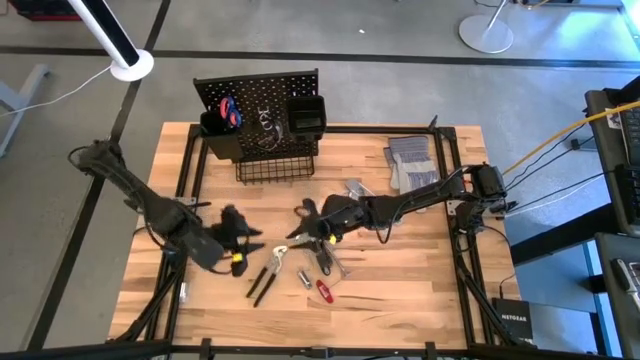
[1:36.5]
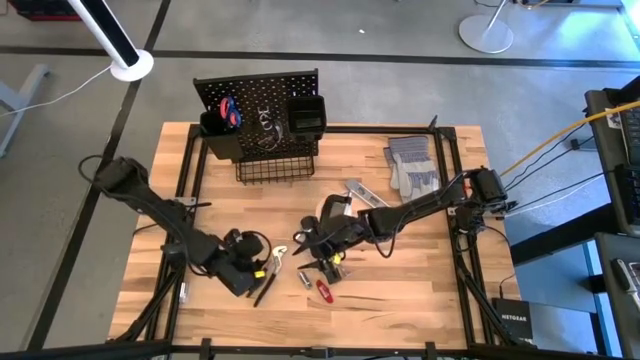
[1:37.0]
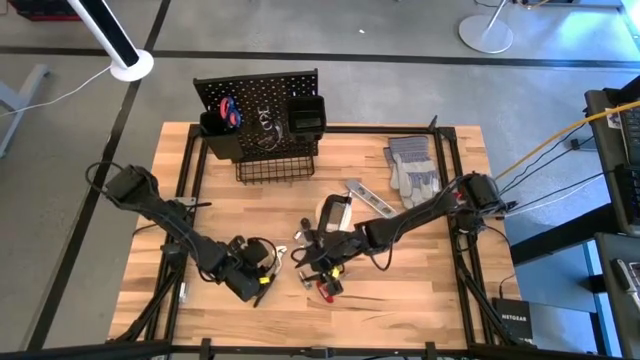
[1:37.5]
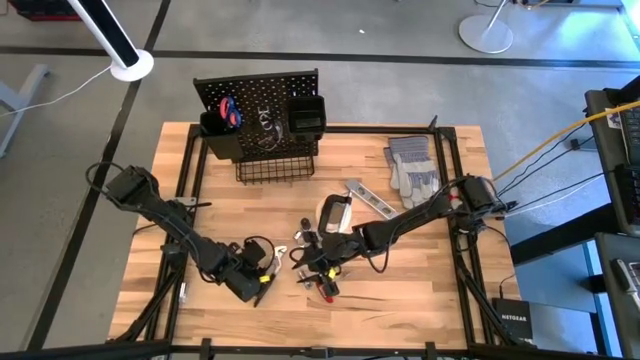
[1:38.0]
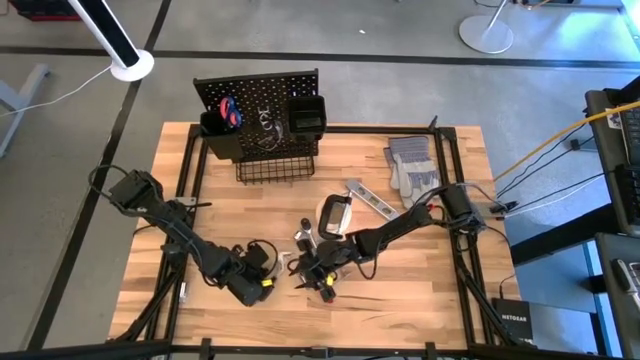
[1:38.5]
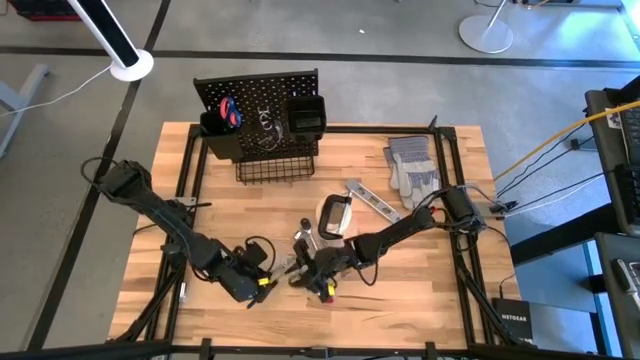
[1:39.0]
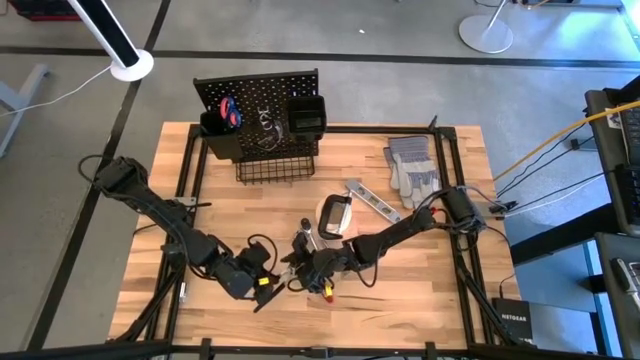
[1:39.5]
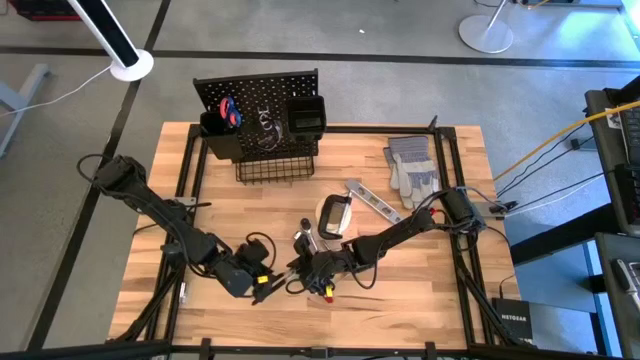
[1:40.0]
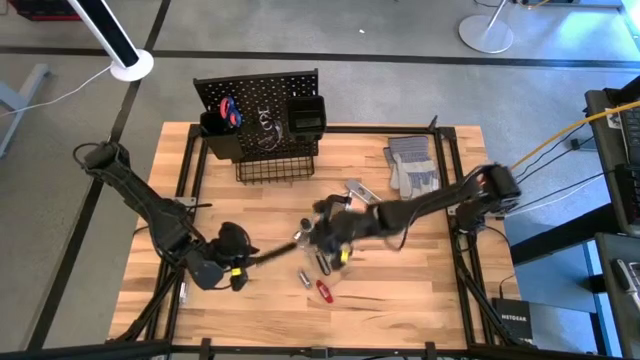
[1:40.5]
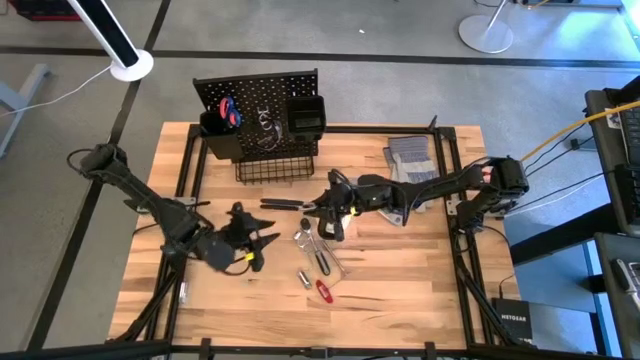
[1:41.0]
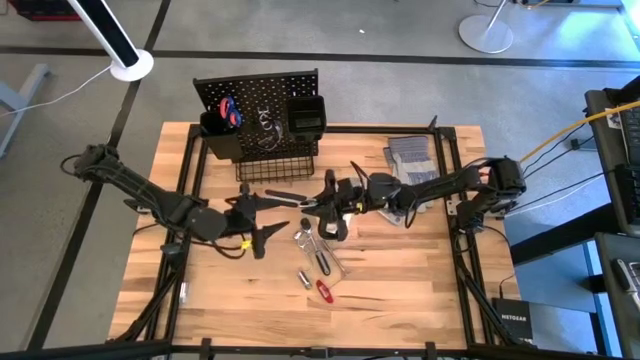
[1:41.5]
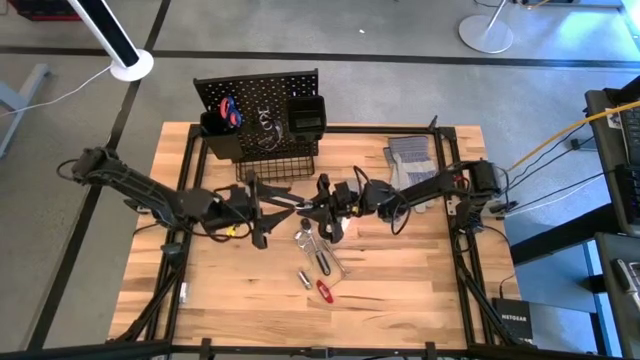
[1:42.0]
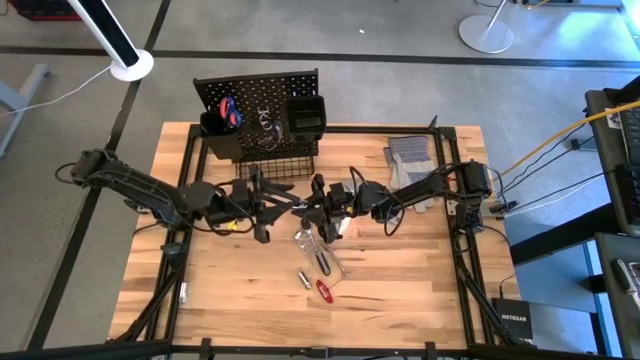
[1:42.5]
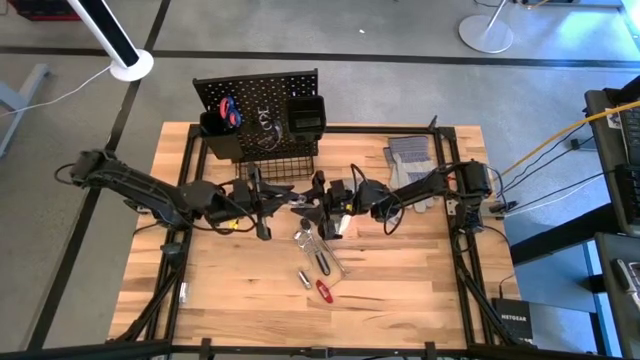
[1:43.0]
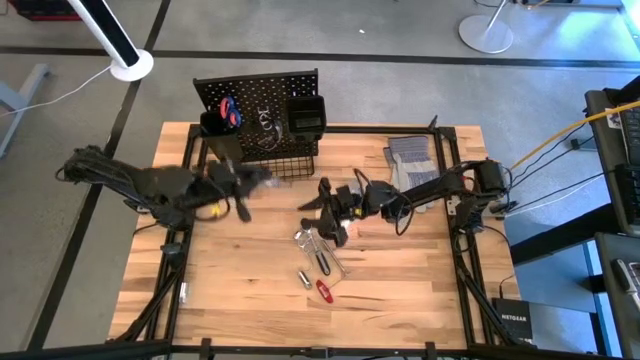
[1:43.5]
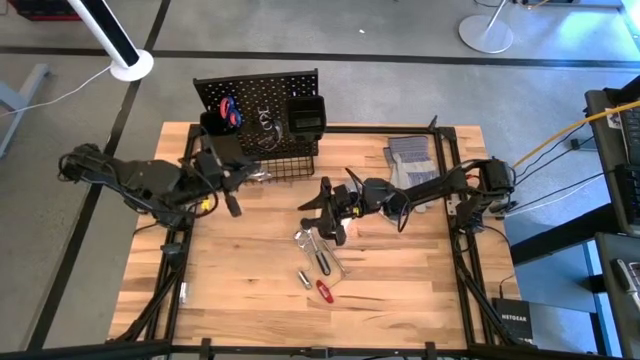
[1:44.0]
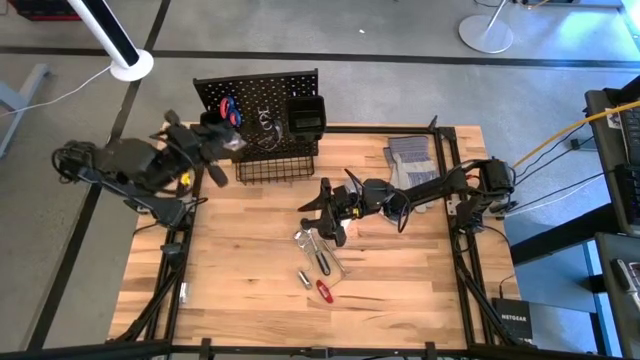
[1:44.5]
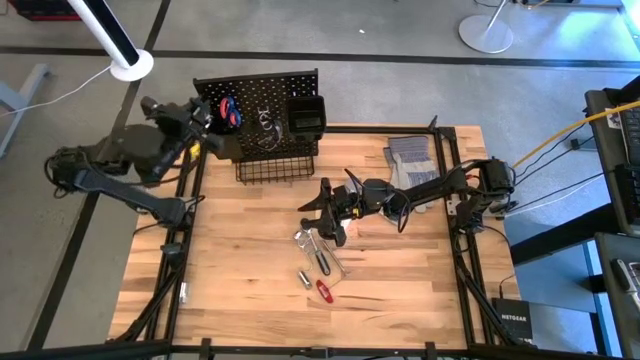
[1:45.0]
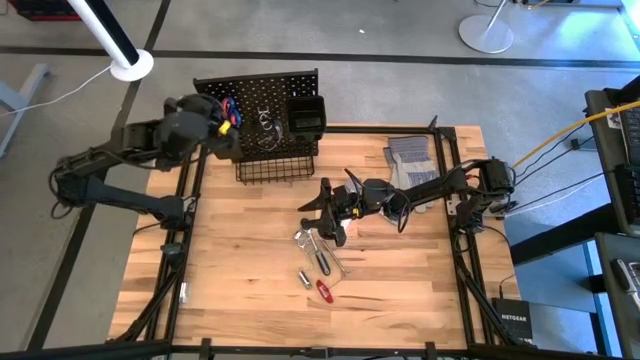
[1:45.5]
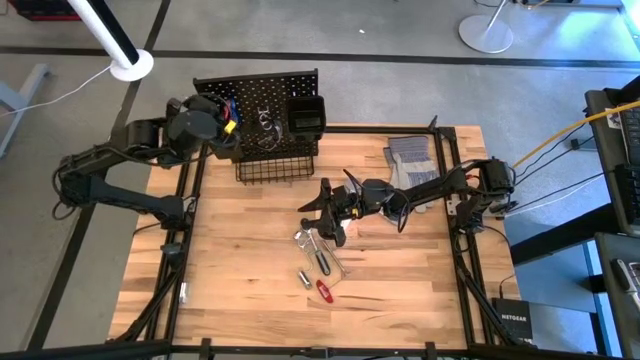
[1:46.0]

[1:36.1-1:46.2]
Task: Hang tools onto peg board
Put the black adjustable pliers into the left black bin on the pegboard

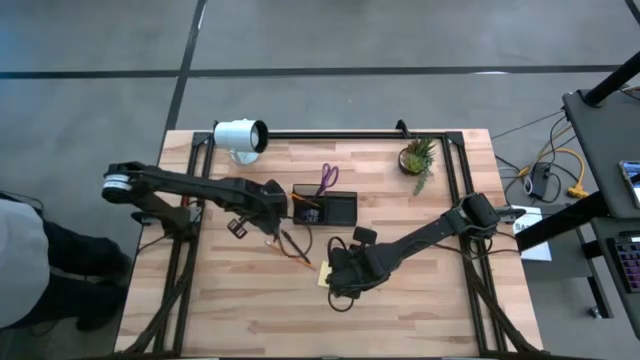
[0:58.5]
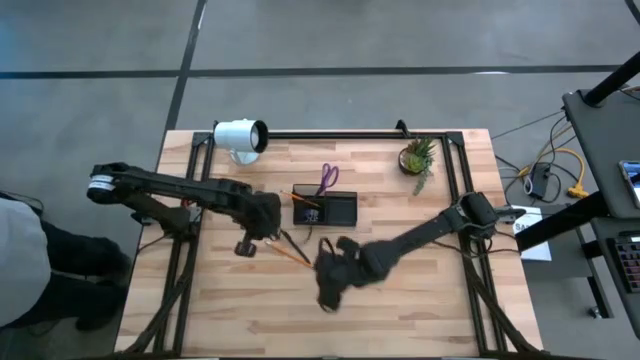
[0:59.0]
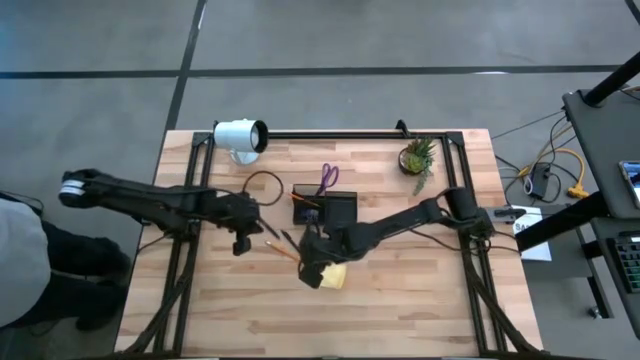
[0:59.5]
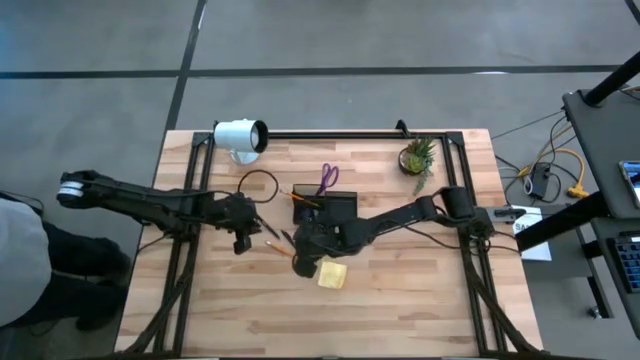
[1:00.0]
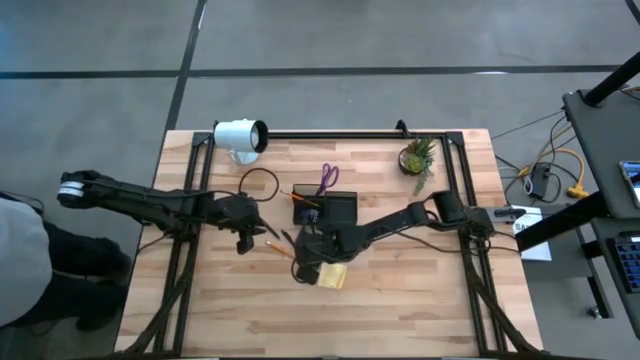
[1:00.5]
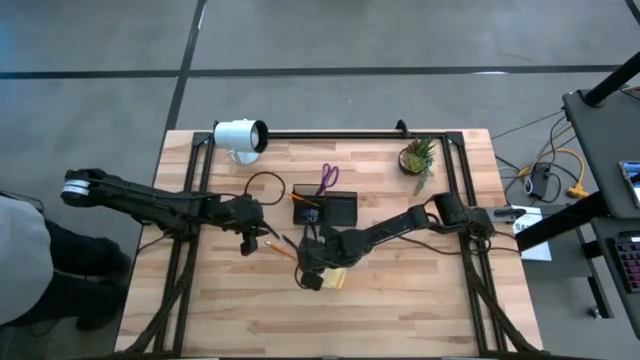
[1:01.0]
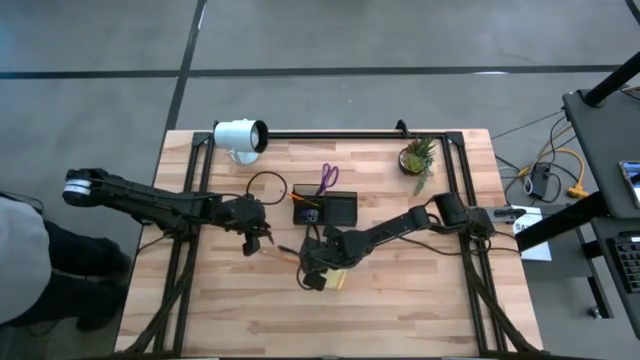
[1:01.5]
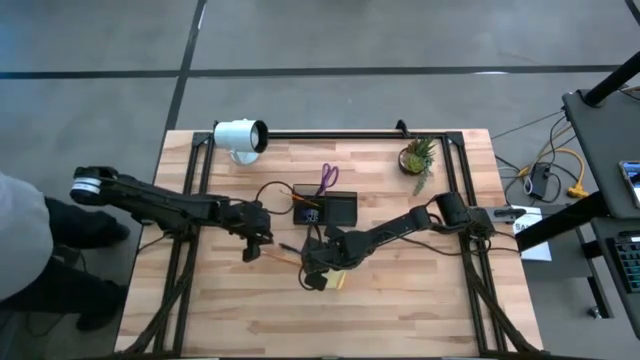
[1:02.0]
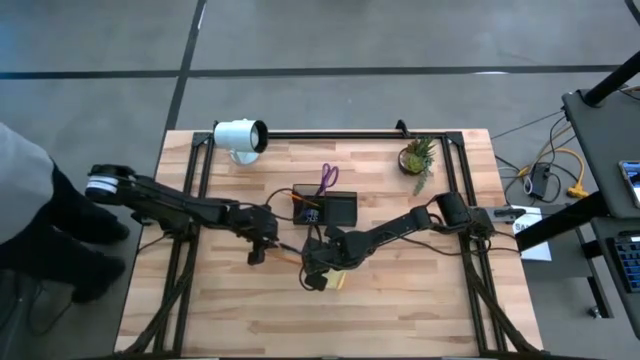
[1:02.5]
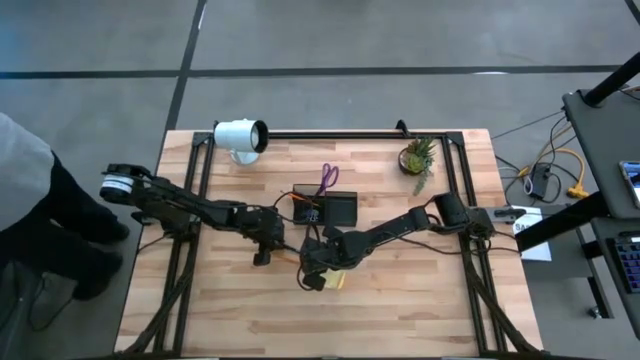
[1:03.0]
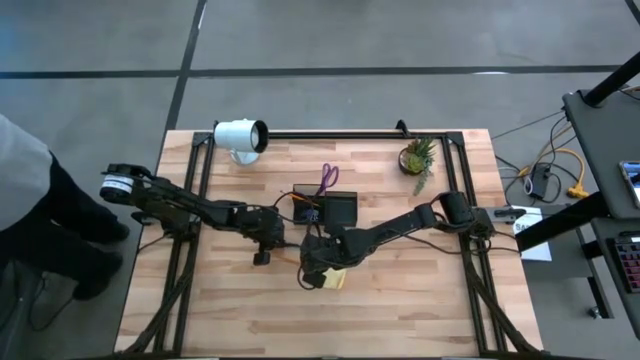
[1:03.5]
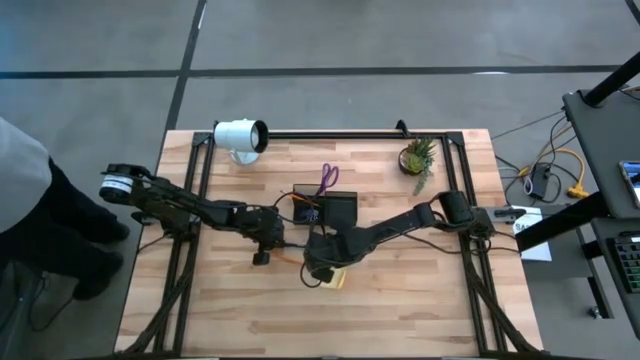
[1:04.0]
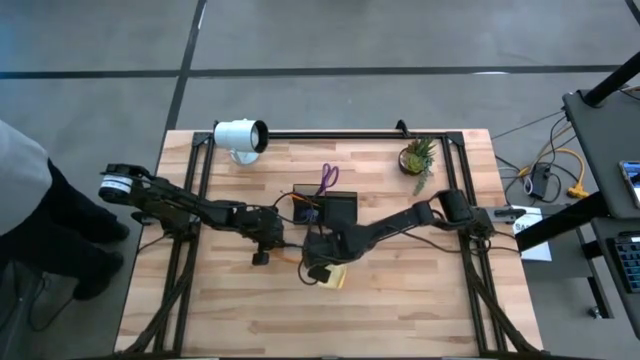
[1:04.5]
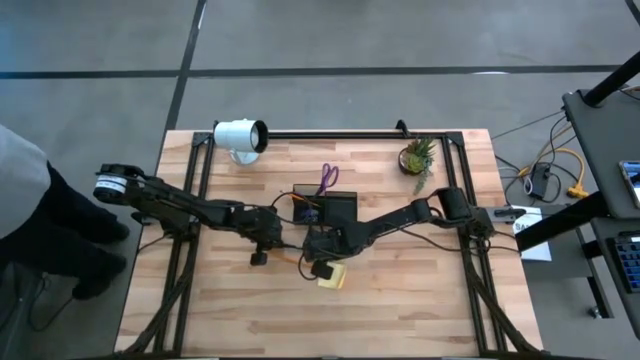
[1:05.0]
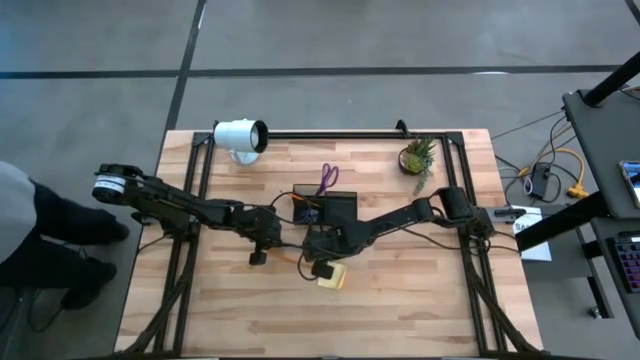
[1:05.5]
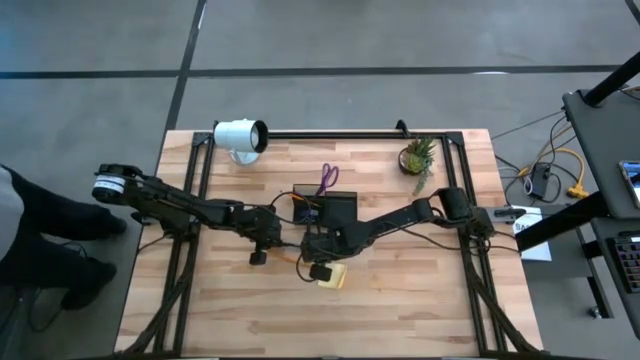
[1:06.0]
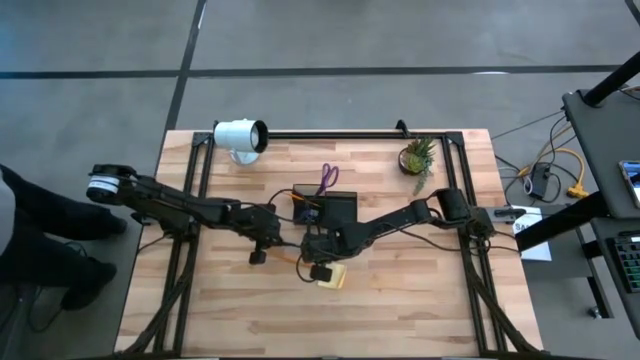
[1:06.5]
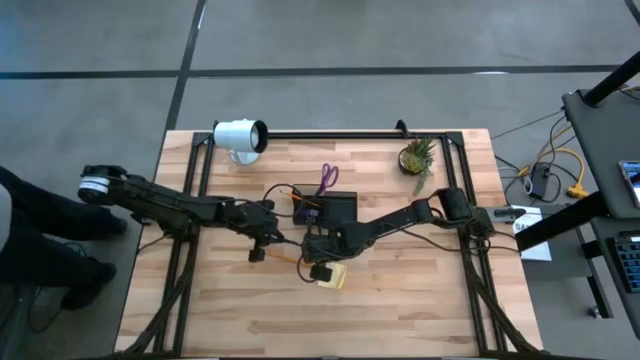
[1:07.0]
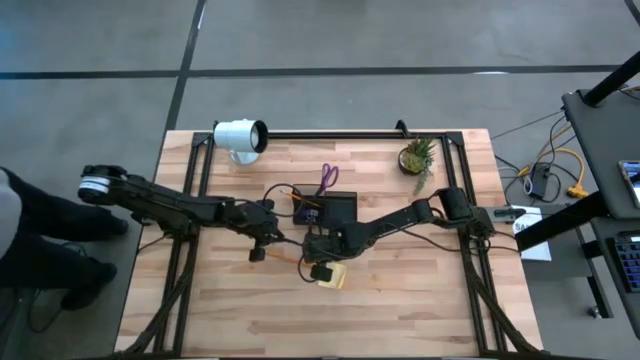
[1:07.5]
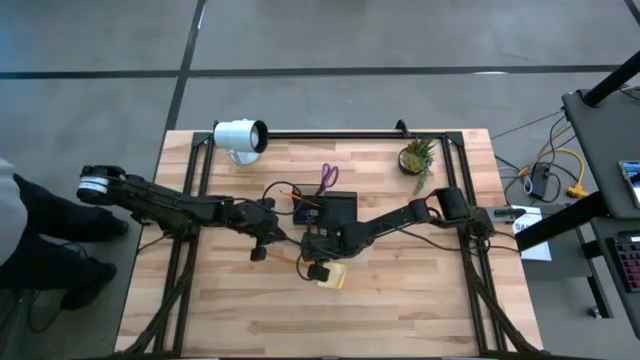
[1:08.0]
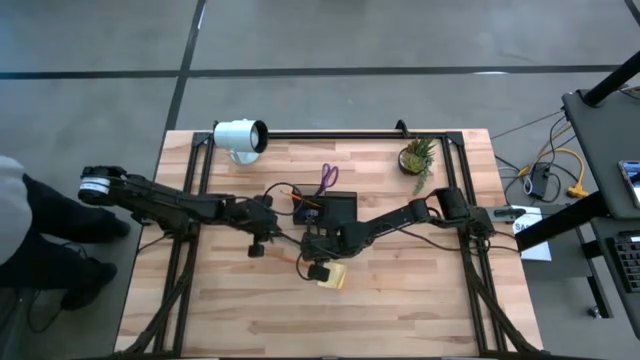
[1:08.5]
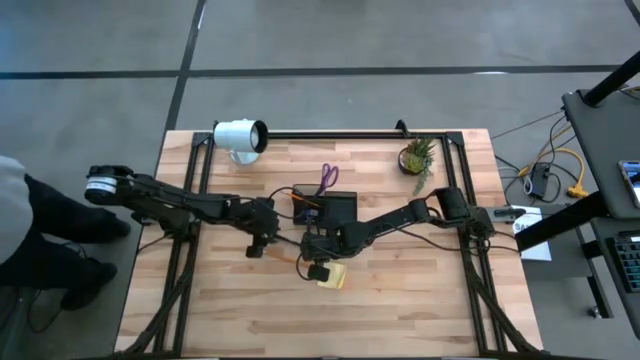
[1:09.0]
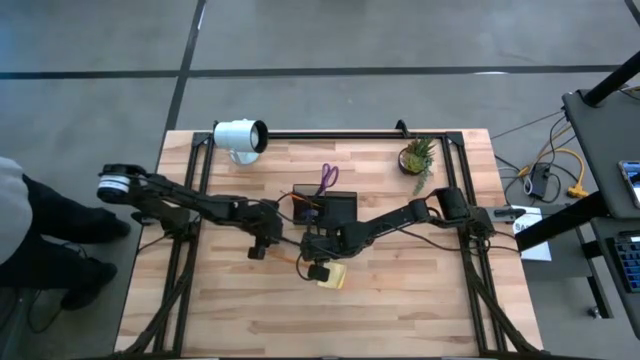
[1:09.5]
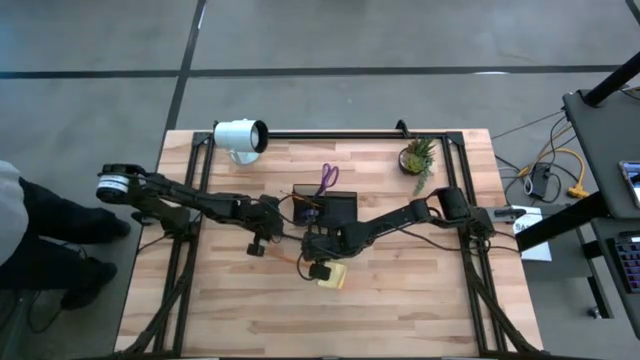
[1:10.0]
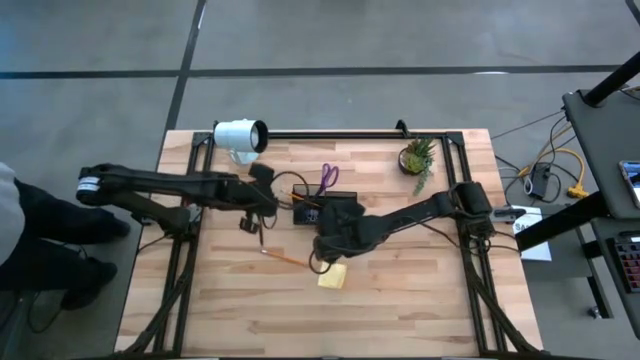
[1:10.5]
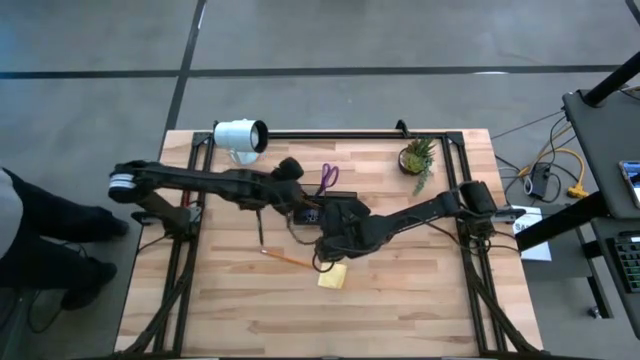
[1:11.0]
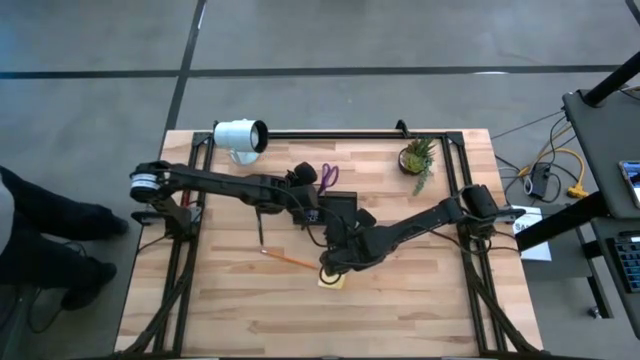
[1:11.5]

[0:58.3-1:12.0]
Task: Pick and place office supplies into organizer
Put the bottom black pen into the black desk organizer
